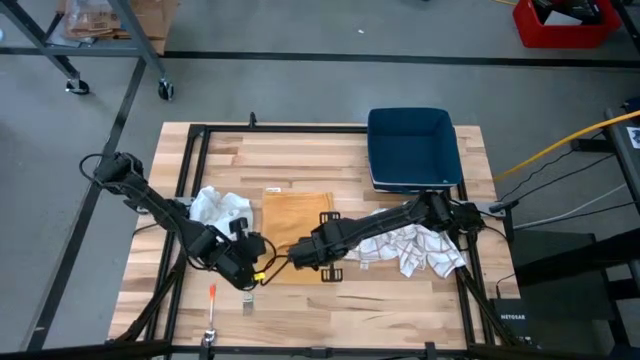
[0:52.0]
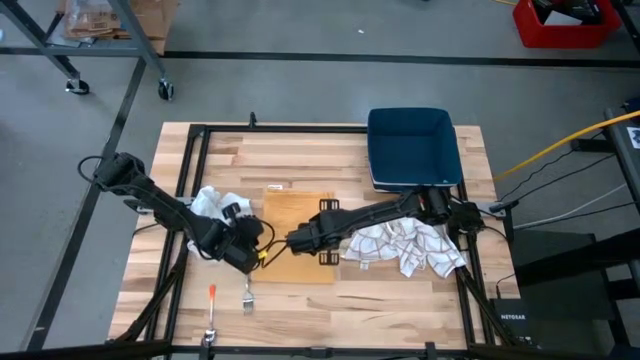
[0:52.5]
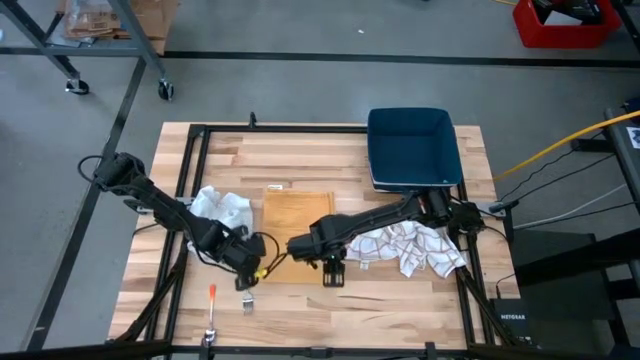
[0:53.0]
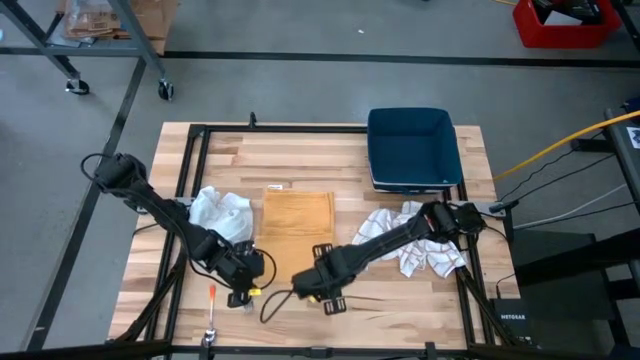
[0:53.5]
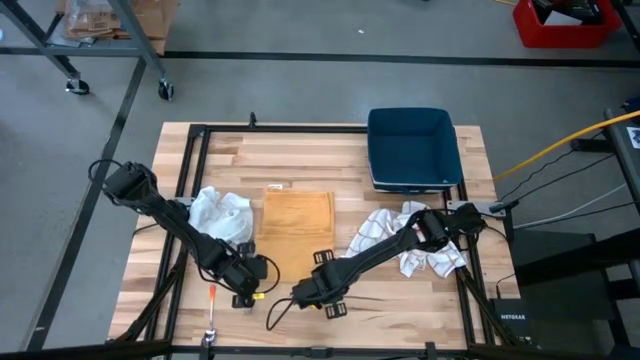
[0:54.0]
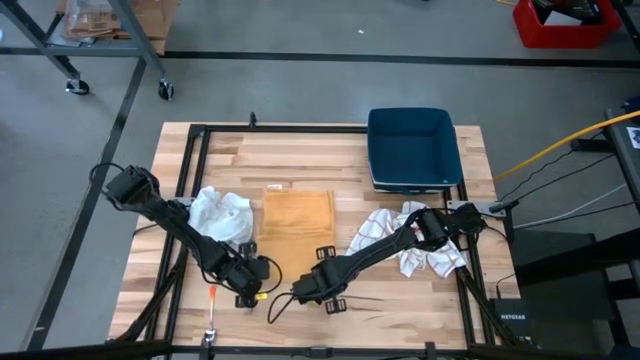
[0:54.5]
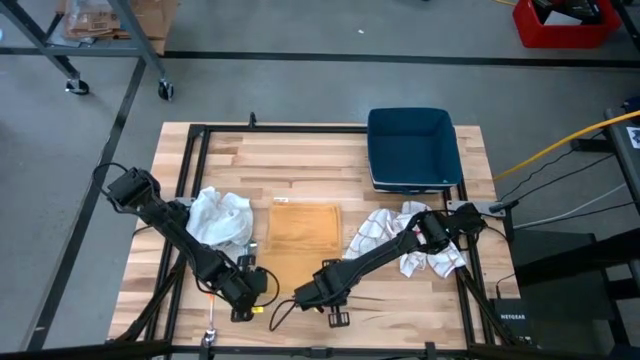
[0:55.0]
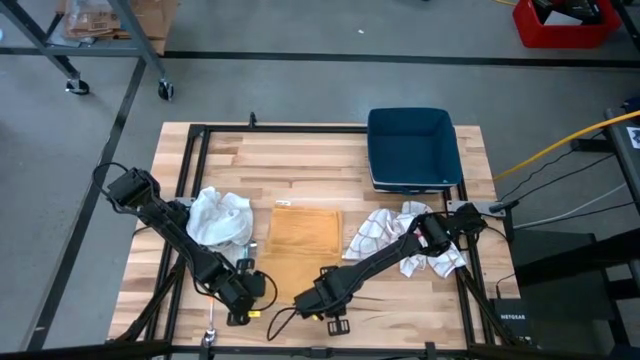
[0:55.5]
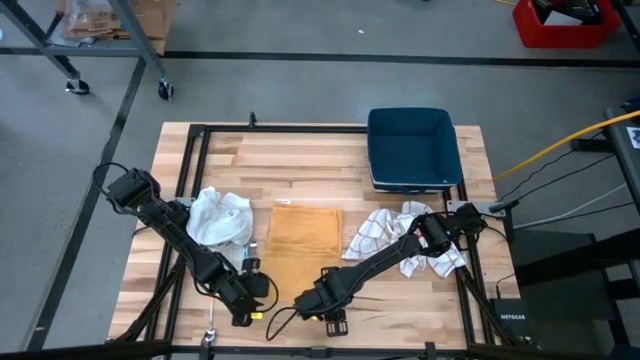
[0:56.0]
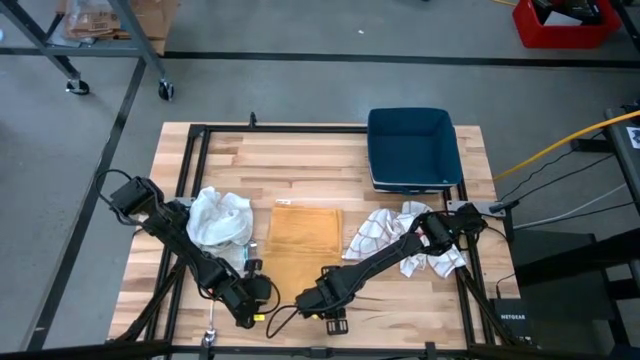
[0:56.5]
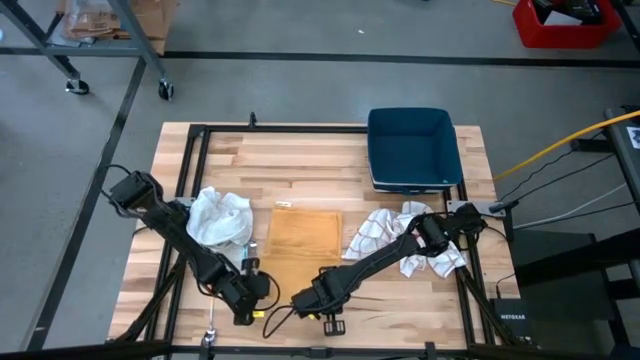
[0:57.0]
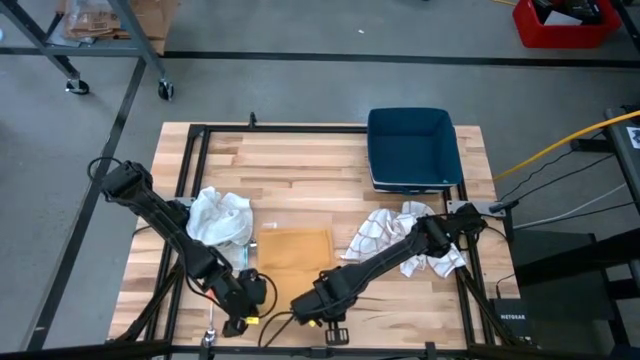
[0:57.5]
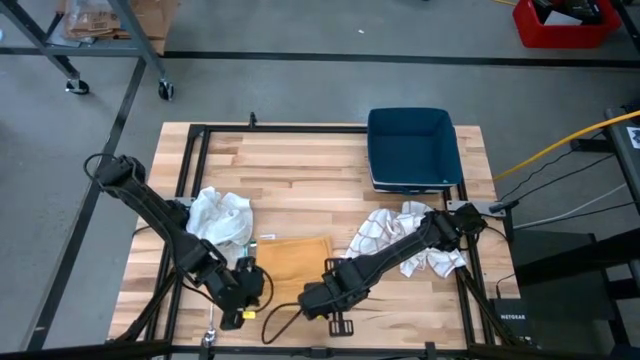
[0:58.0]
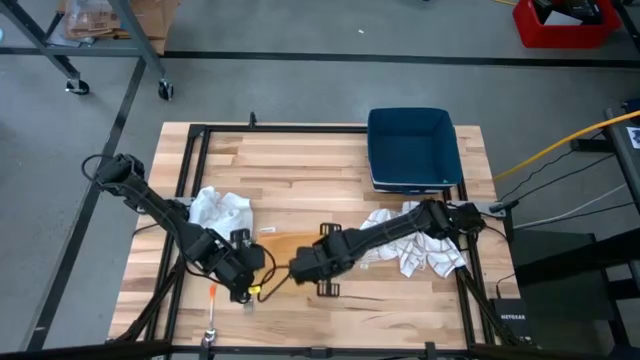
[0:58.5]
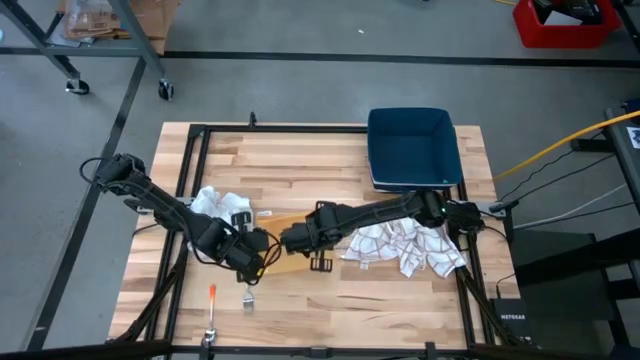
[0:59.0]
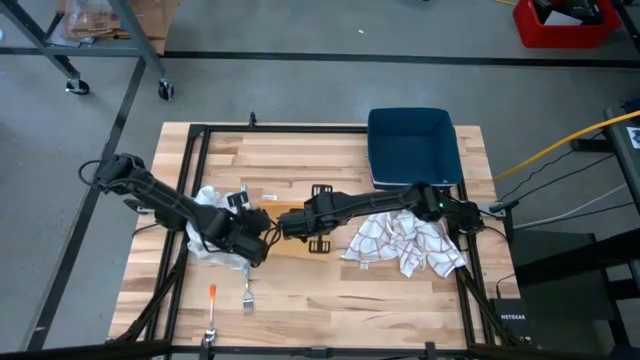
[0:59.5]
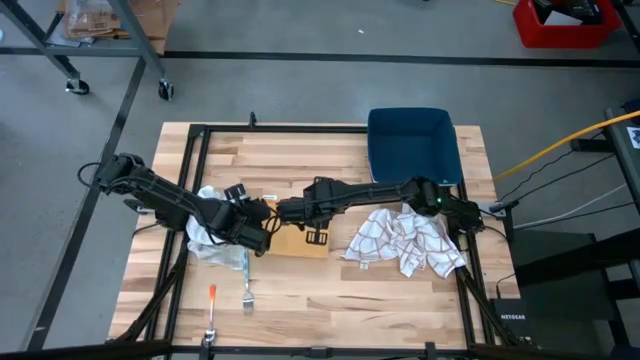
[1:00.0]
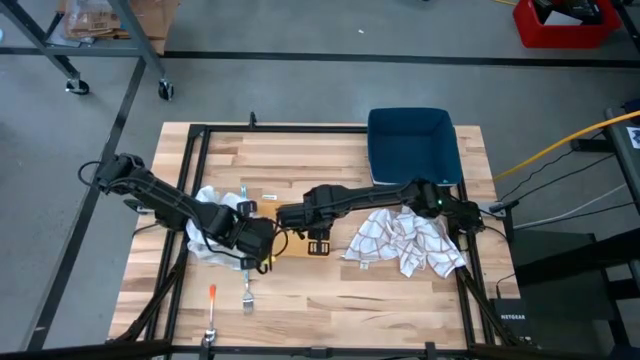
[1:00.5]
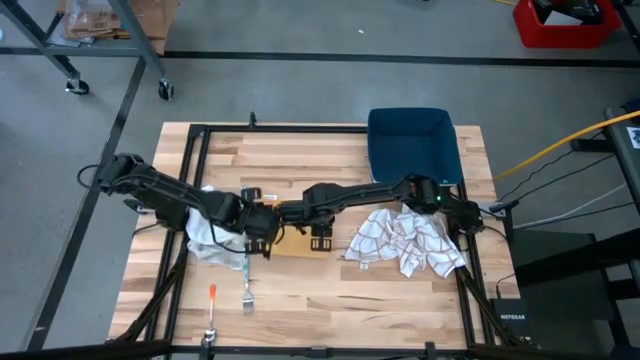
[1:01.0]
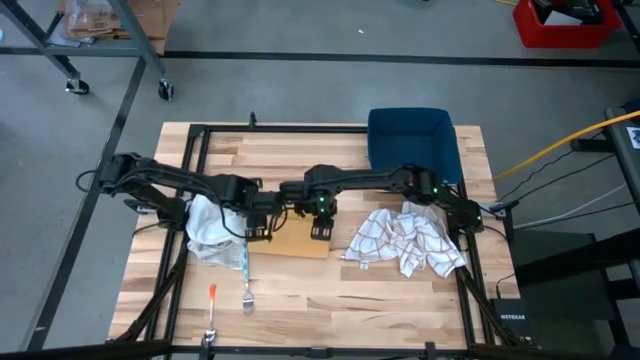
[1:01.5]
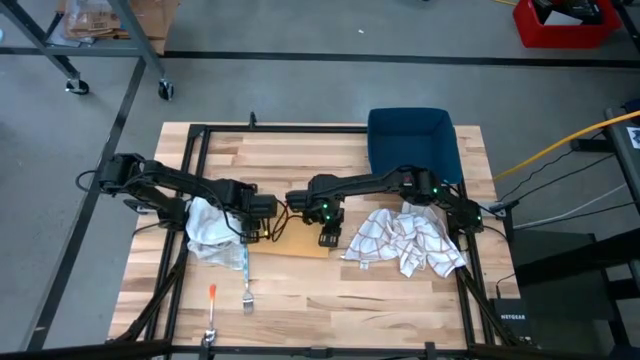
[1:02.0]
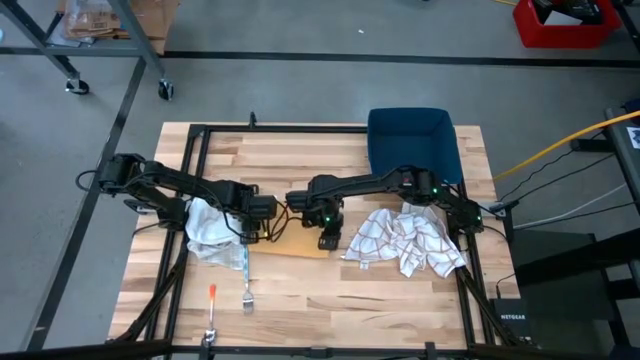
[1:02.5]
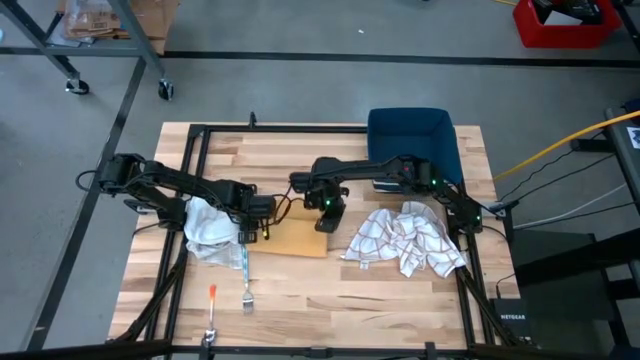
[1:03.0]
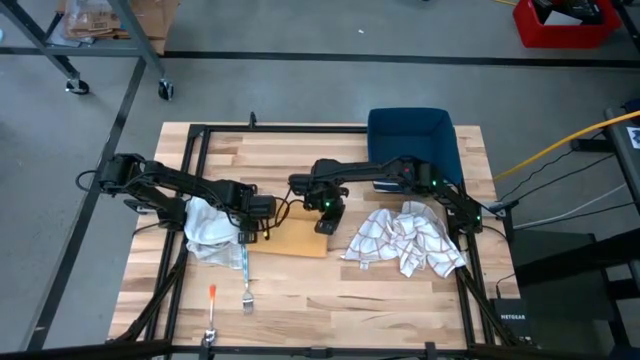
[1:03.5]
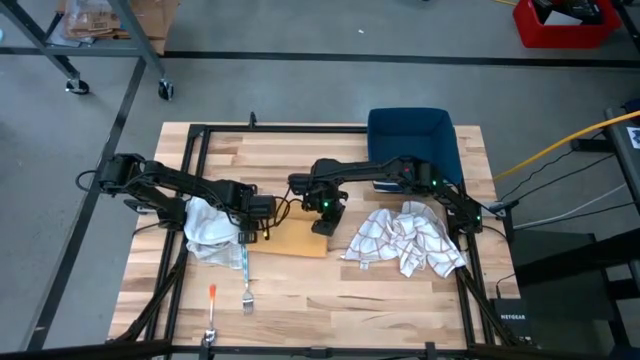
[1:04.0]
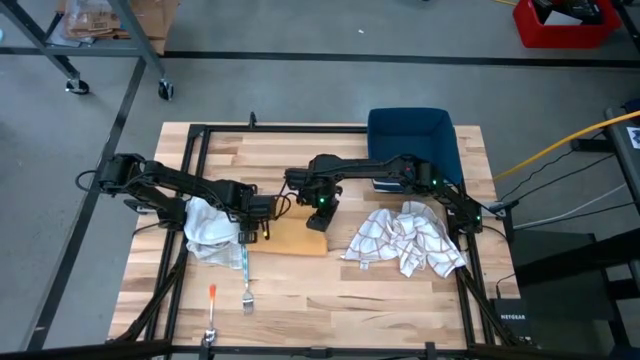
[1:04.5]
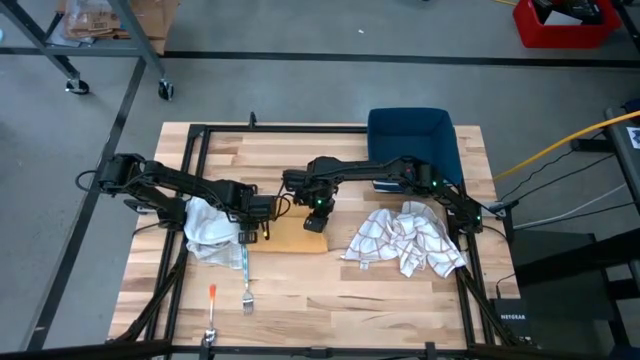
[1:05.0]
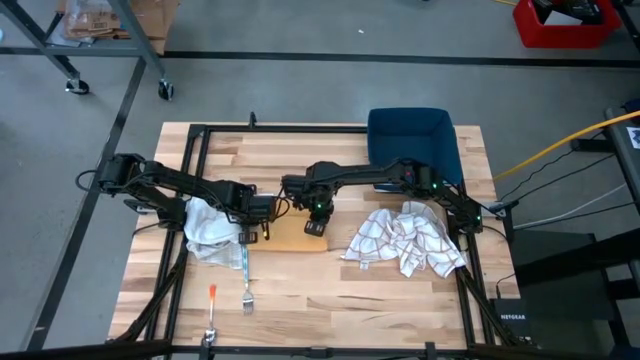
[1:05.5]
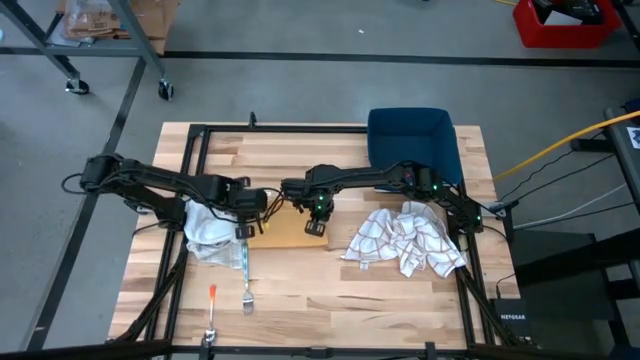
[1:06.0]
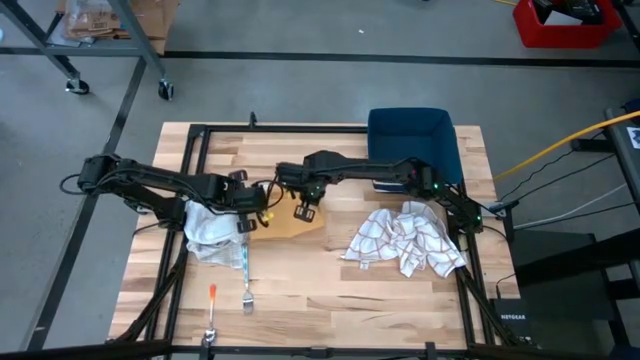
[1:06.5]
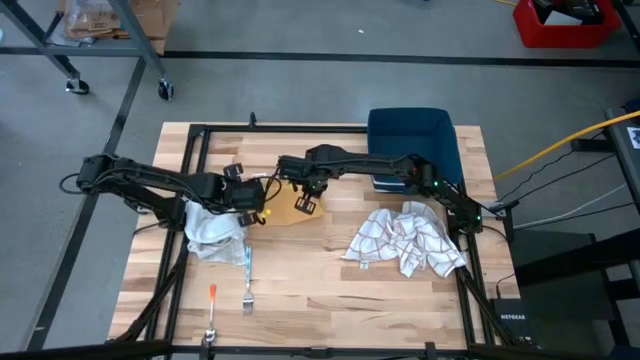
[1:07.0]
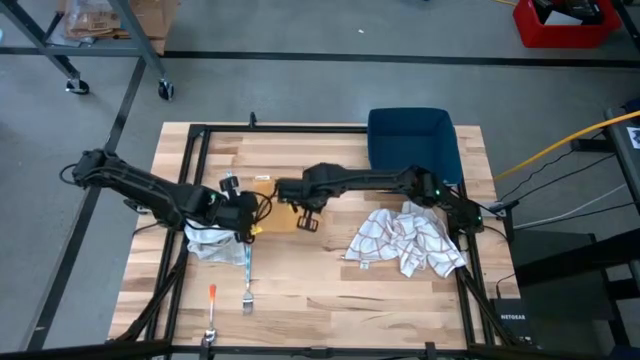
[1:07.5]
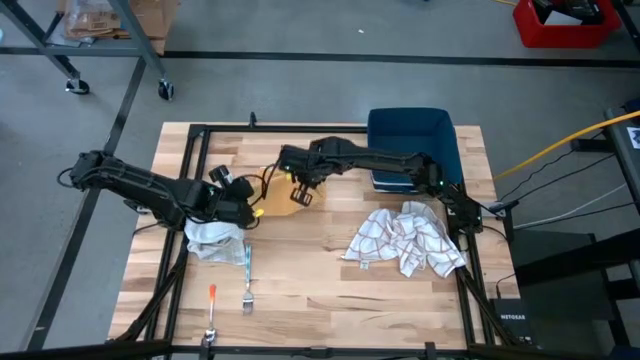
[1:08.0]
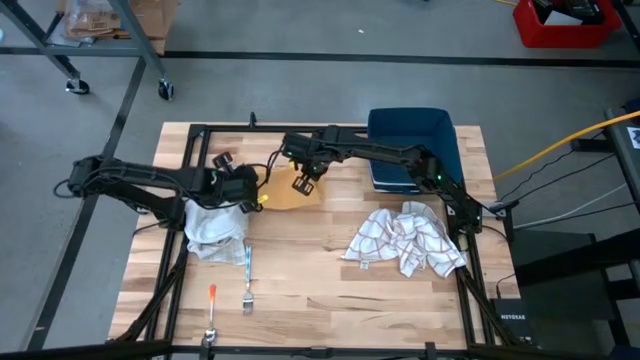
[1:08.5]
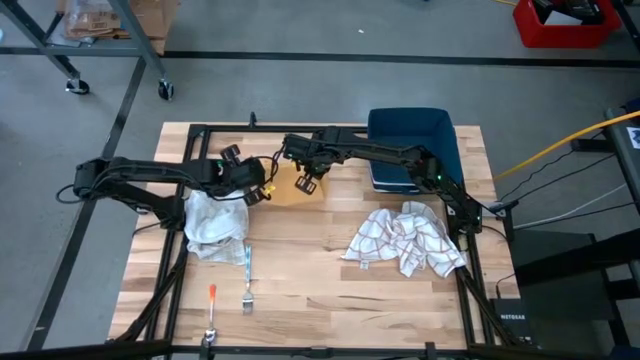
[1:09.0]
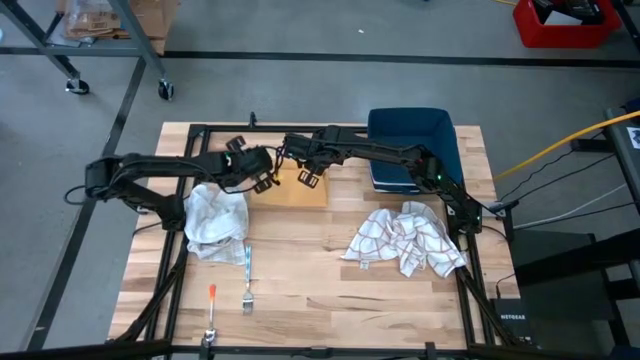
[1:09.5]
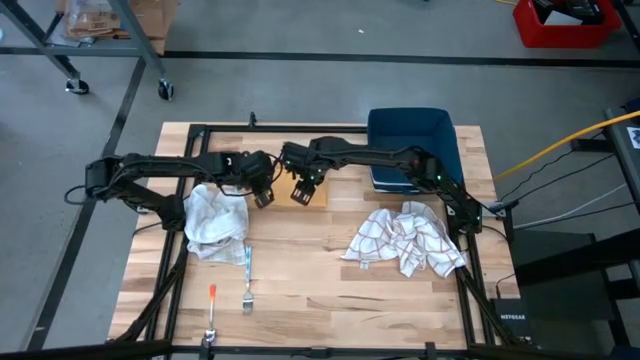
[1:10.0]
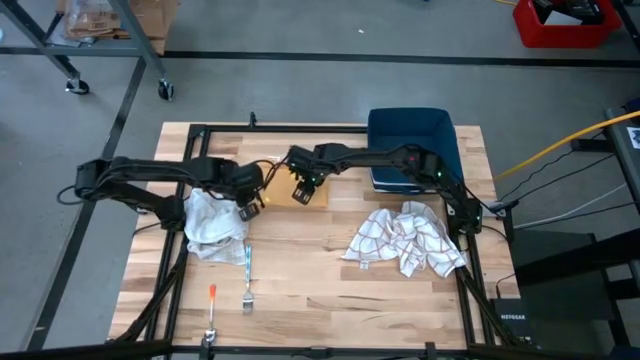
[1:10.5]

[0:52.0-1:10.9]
Task: Fold towel
Fold the yellow towel
